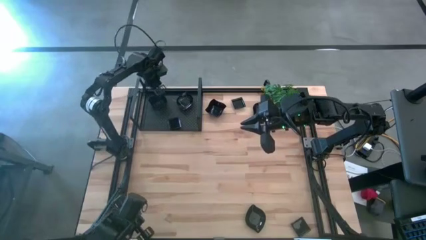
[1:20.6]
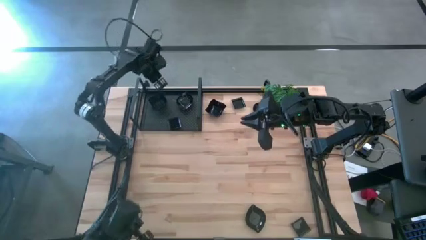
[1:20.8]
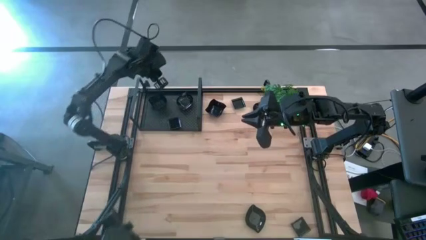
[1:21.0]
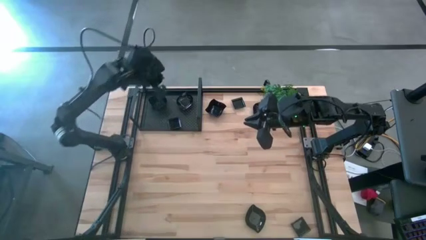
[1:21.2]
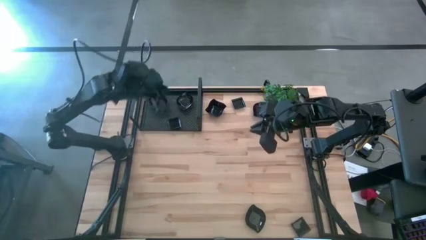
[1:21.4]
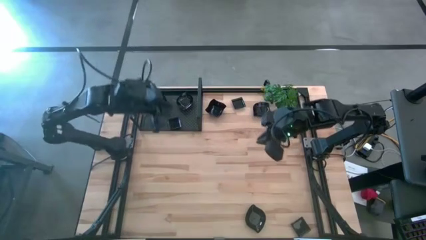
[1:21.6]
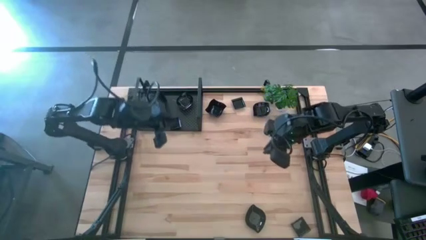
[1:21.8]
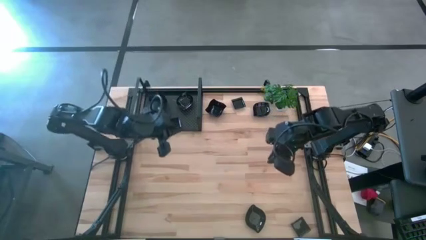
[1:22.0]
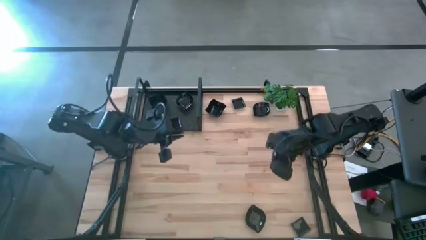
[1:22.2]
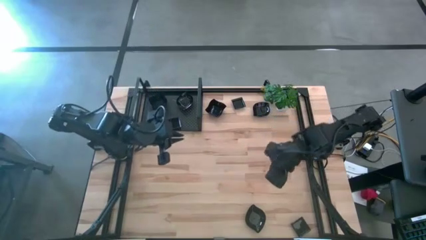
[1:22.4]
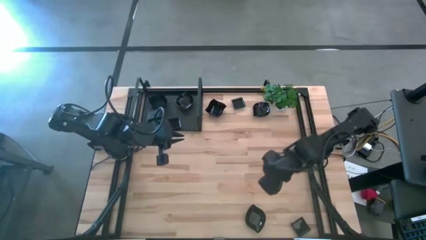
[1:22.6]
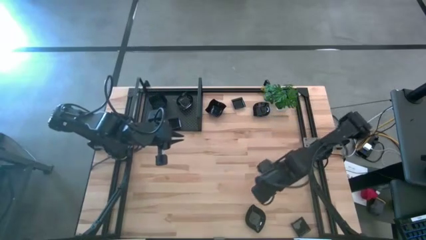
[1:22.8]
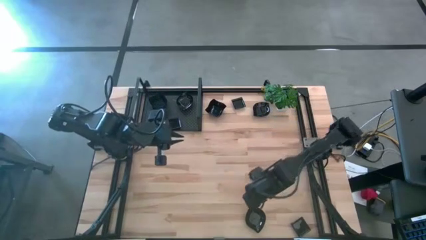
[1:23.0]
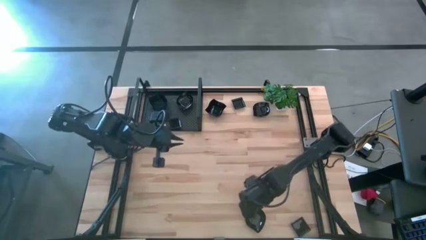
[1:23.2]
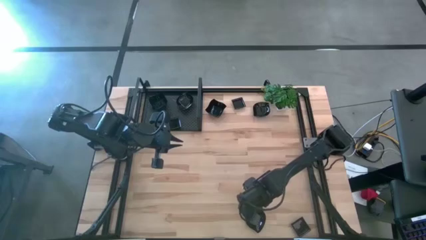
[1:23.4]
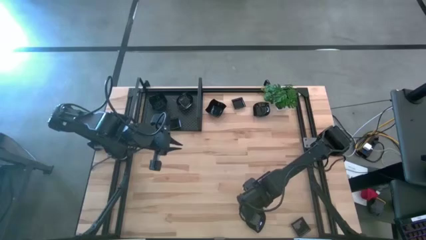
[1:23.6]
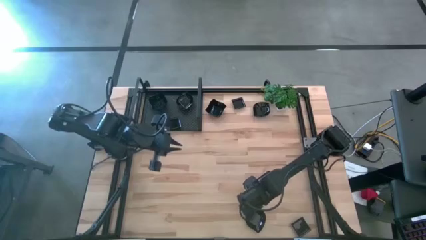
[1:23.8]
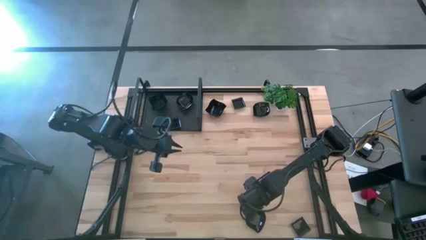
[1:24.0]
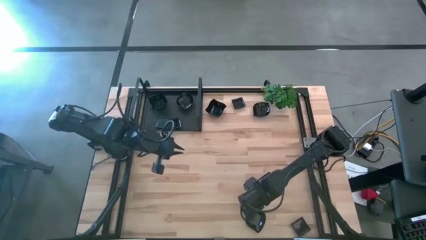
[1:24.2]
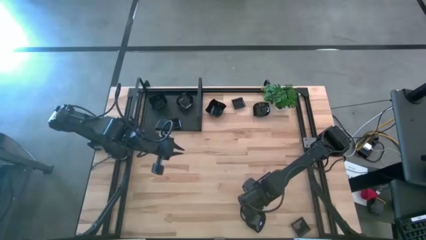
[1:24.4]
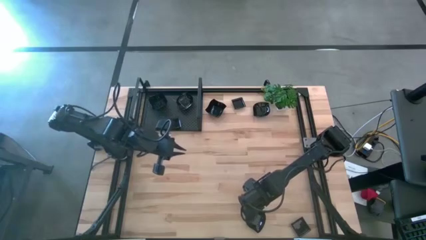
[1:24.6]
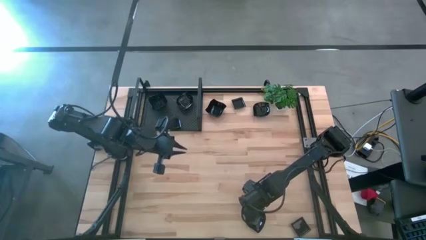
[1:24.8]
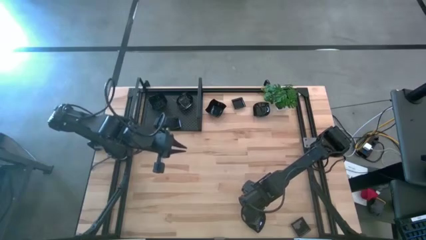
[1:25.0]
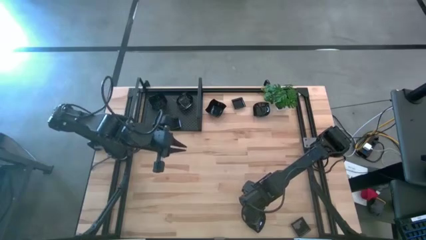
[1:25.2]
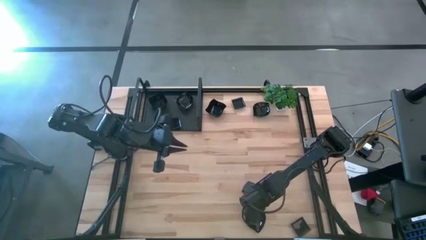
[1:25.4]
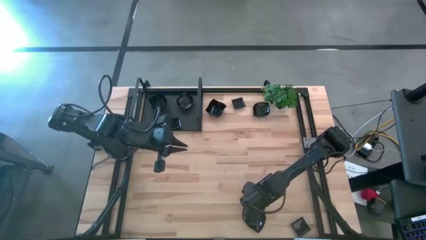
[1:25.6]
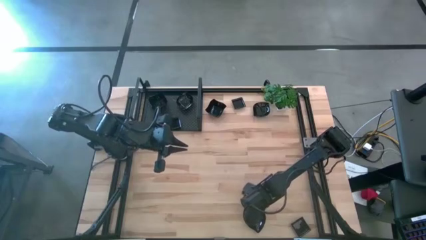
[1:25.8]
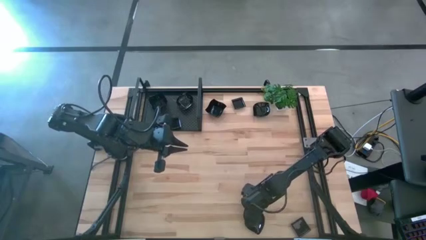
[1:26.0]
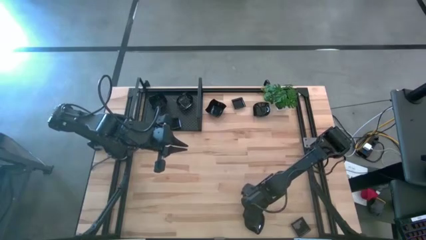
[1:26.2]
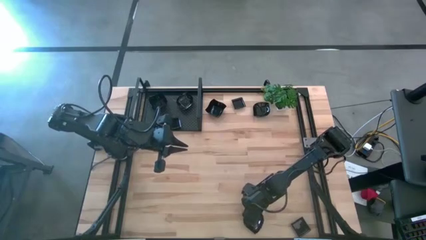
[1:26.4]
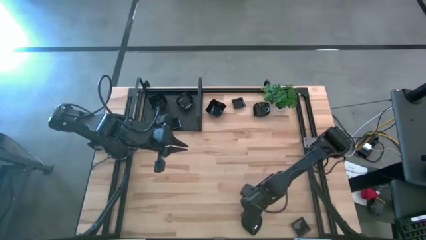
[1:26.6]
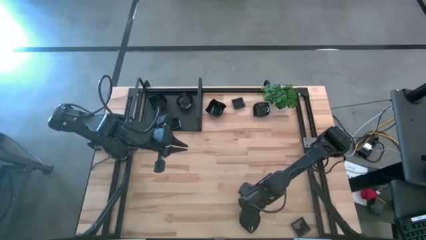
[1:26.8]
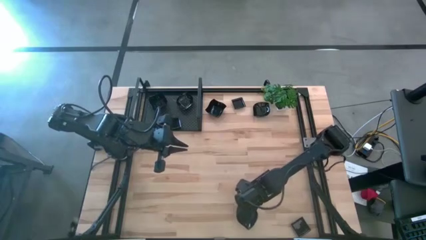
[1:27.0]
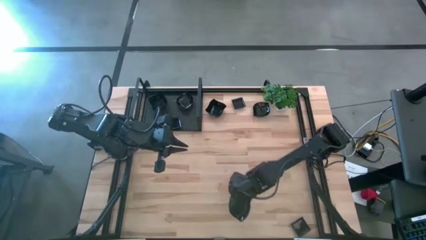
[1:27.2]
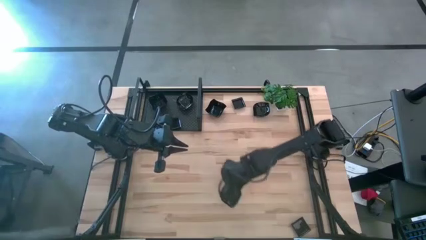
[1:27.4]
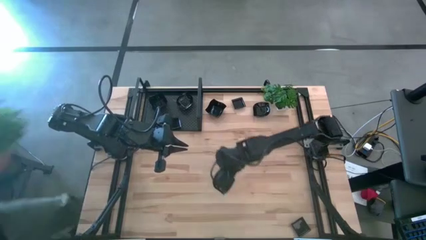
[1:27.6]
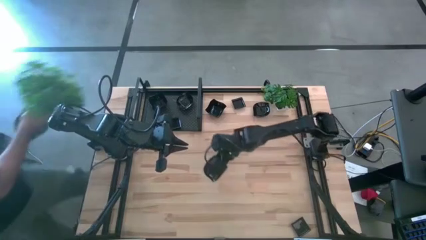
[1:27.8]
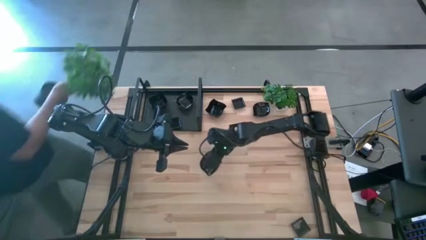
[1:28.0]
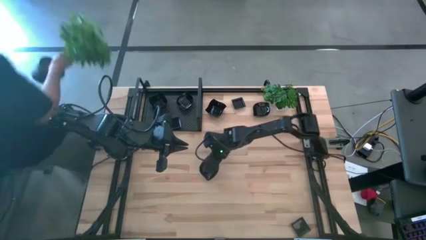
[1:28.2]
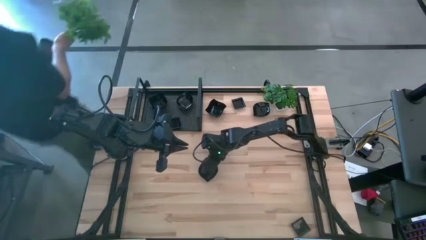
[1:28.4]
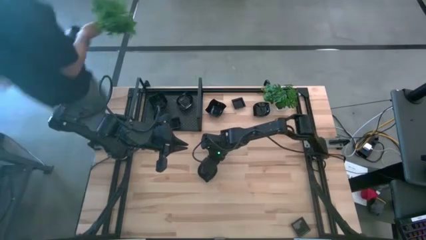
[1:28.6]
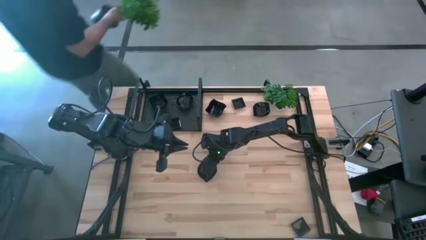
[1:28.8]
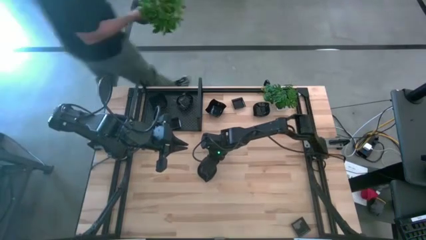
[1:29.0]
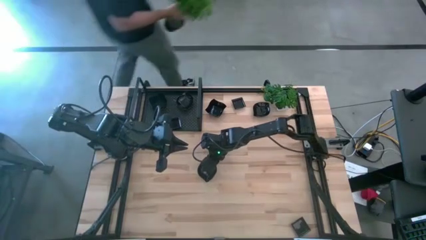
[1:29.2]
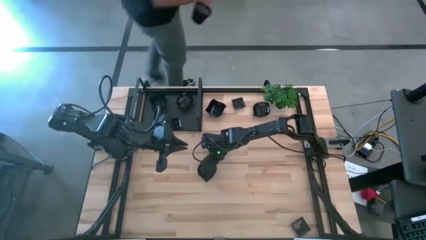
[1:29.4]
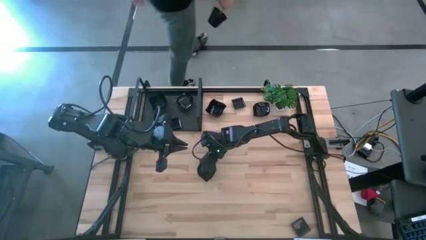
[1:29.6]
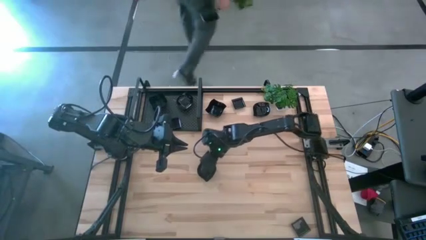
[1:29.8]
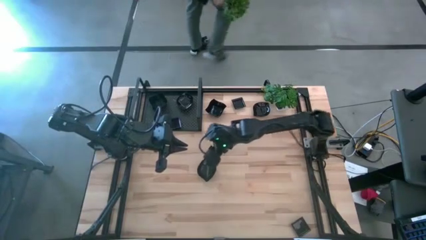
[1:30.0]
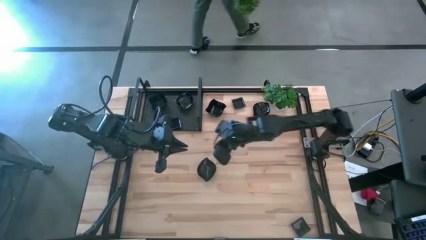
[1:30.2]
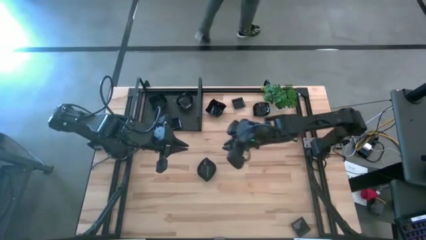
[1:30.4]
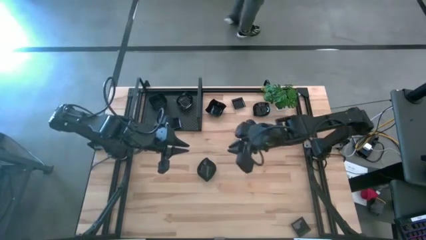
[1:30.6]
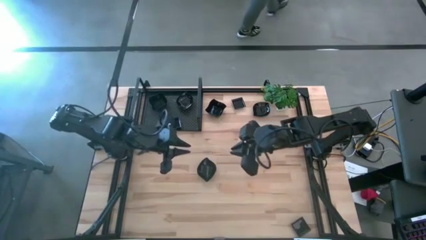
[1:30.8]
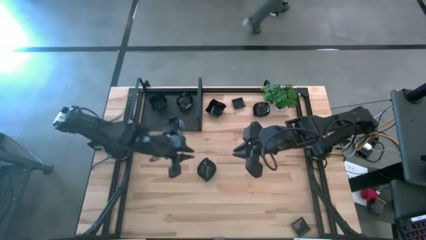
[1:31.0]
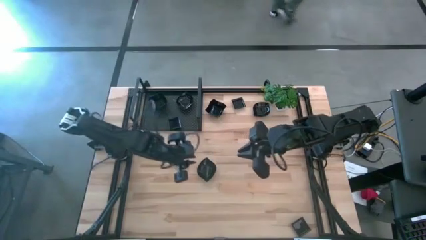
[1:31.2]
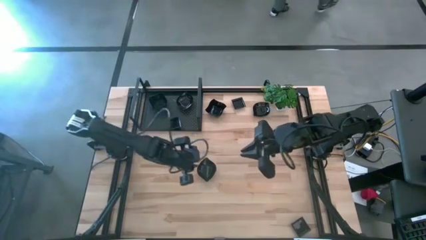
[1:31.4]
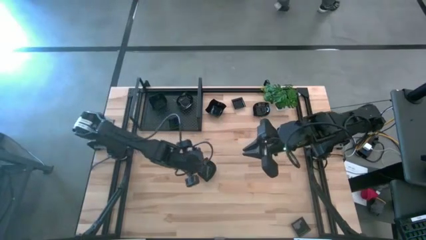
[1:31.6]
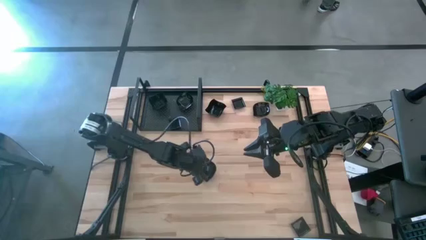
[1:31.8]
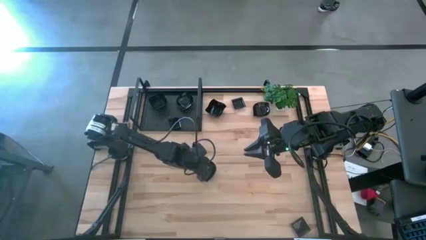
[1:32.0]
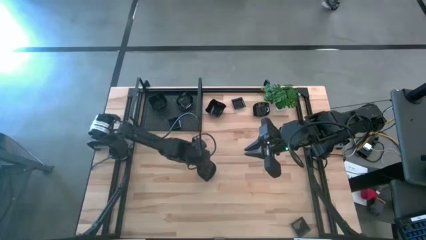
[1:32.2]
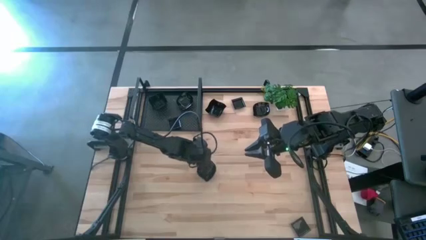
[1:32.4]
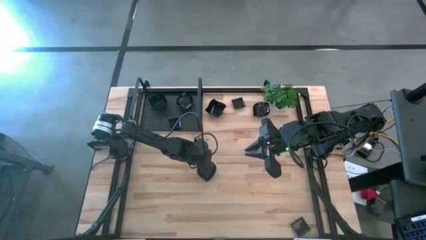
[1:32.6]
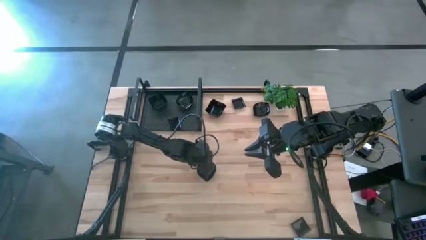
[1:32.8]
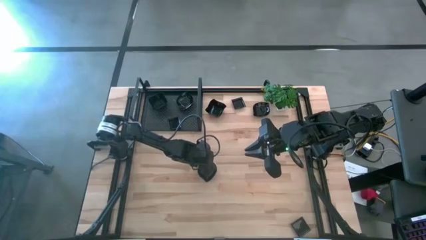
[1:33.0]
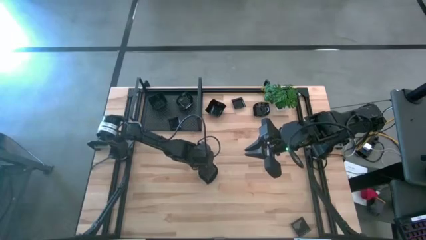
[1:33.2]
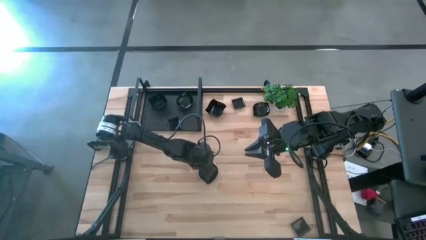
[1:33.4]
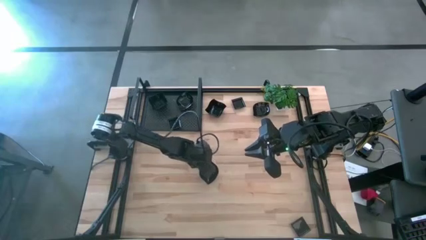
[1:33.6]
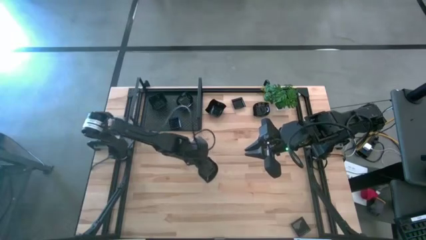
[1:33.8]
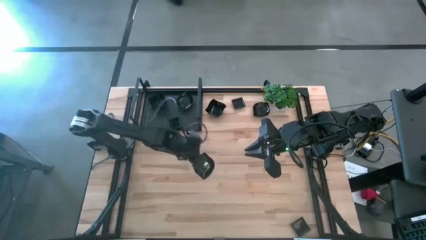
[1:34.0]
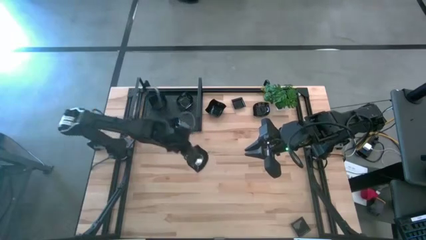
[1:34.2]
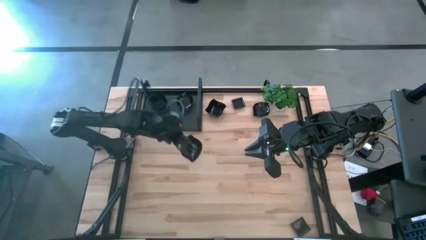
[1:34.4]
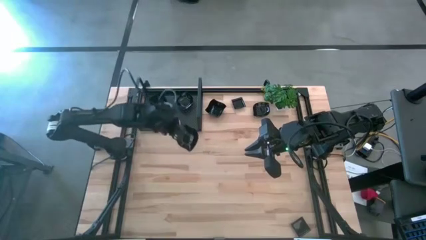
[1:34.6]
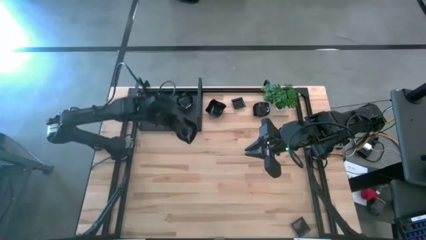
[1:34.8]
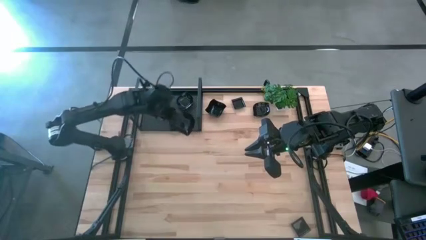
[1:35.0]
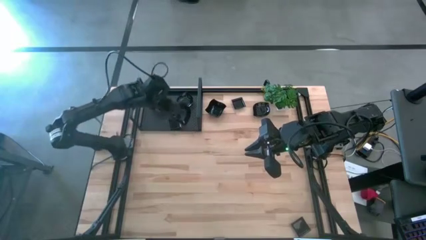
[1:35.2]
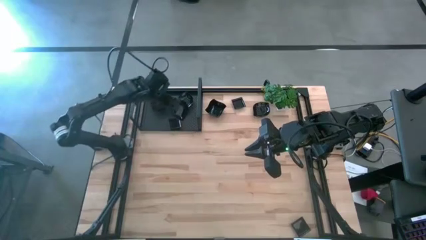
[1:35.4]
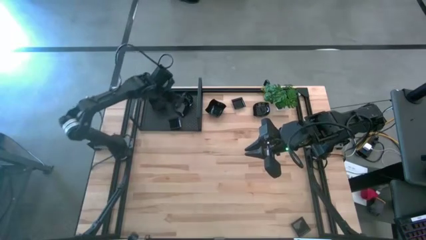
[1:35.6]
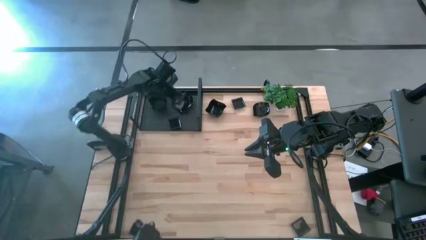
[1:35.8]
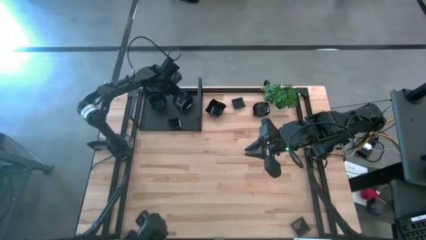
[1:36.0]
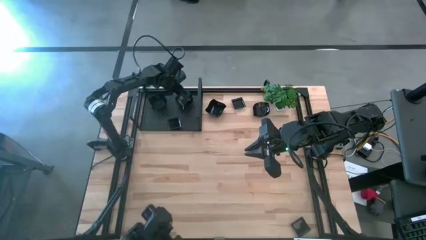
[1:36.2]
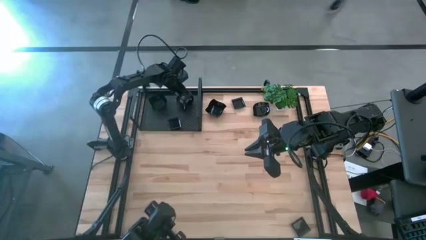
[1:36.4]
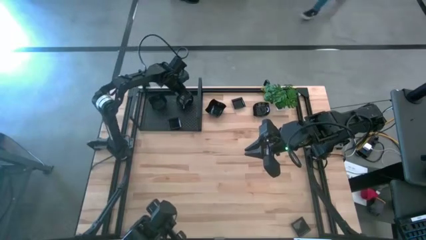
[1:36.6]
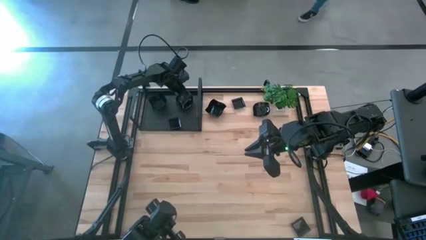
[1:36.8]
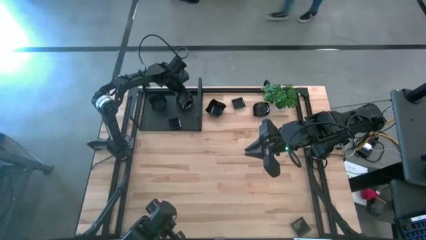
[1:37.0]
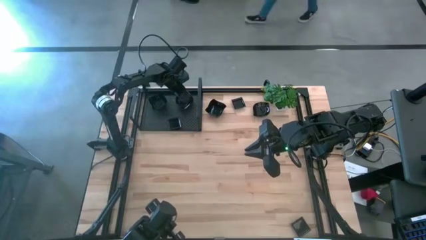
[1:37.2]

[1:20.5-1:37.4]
Task: Pick & Place Mini shaped plates
Stack the black leaf shaped plate on top of the black leaf shaped plates on the shelf
